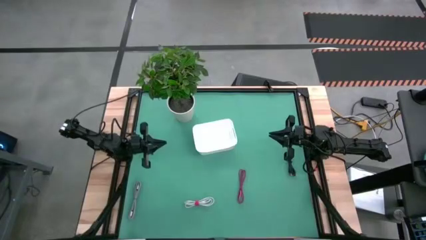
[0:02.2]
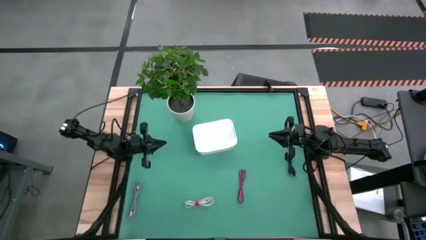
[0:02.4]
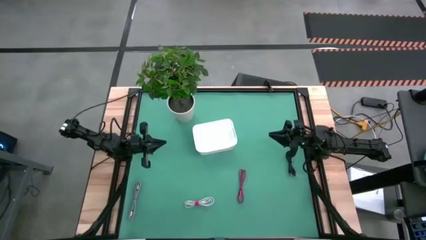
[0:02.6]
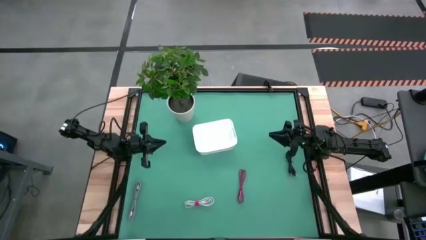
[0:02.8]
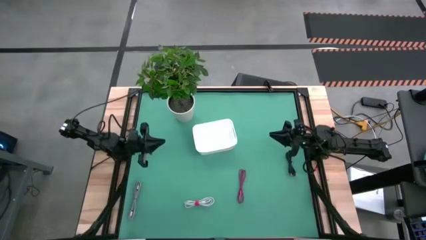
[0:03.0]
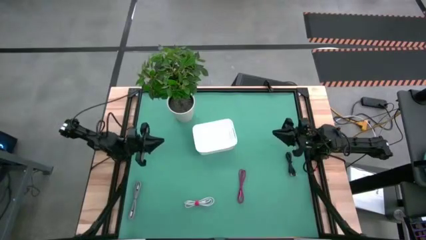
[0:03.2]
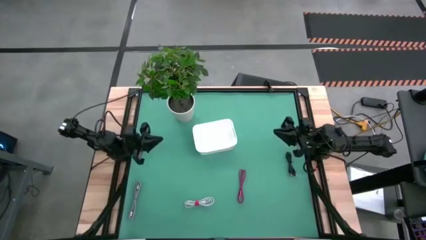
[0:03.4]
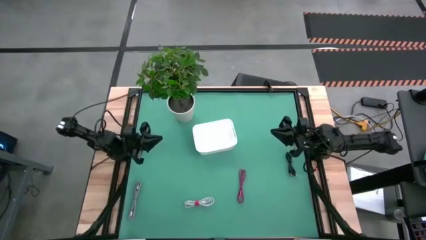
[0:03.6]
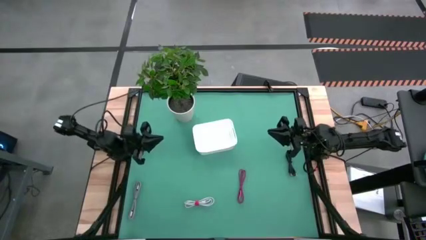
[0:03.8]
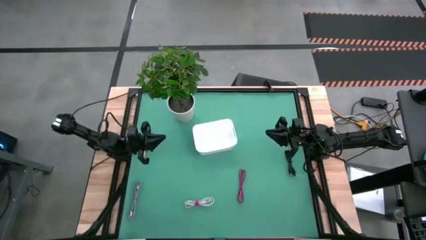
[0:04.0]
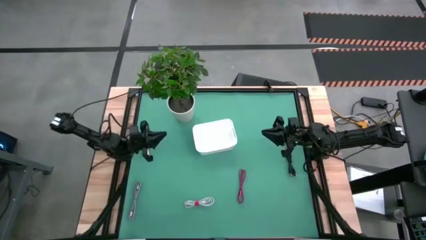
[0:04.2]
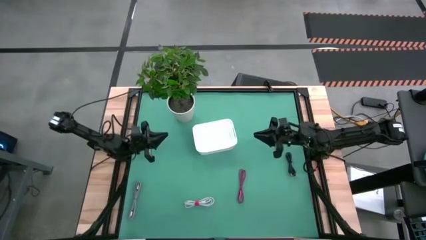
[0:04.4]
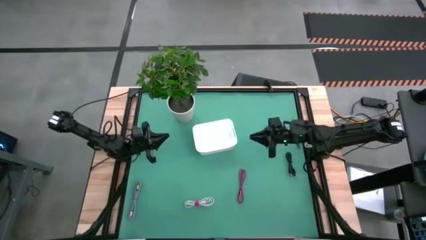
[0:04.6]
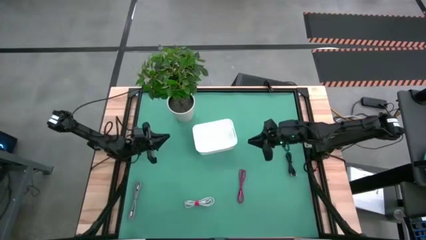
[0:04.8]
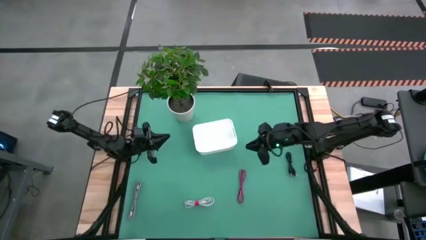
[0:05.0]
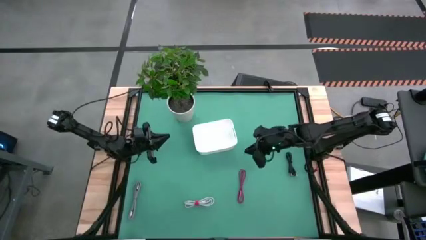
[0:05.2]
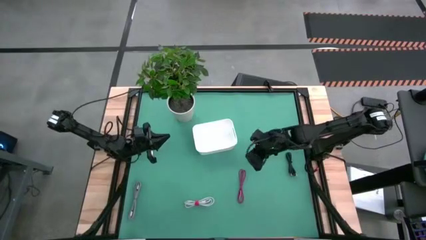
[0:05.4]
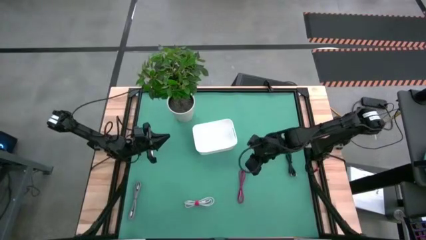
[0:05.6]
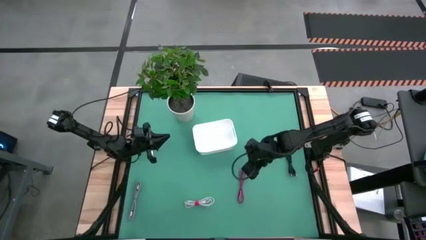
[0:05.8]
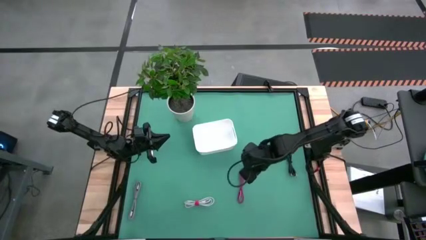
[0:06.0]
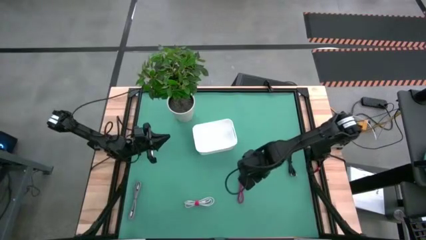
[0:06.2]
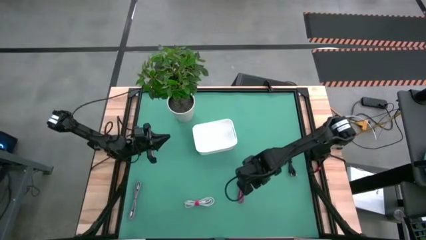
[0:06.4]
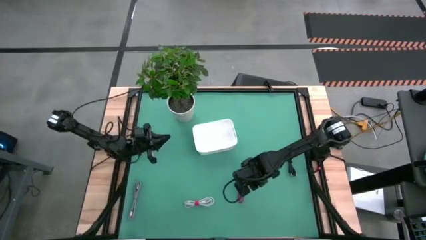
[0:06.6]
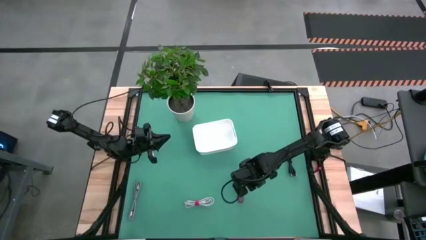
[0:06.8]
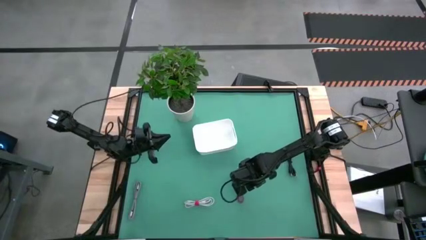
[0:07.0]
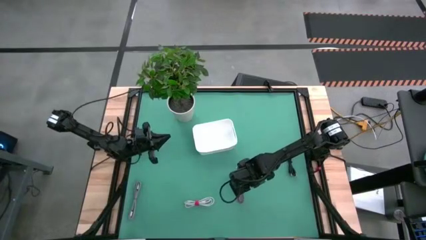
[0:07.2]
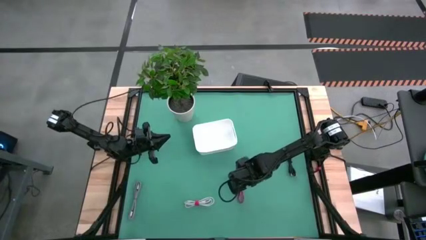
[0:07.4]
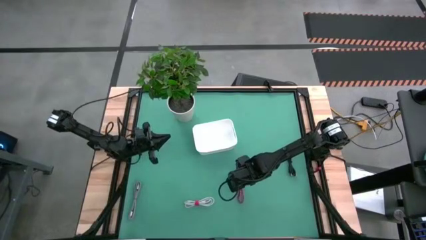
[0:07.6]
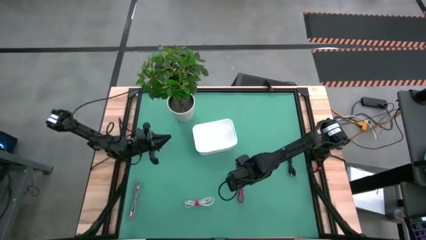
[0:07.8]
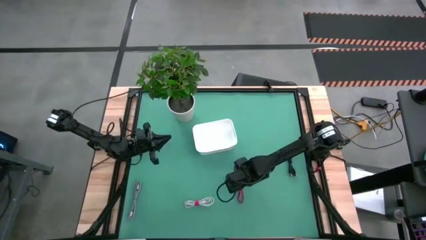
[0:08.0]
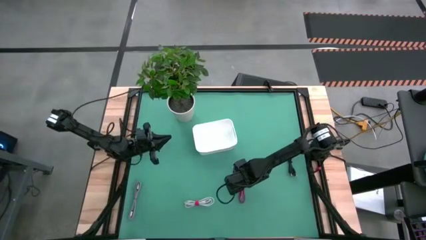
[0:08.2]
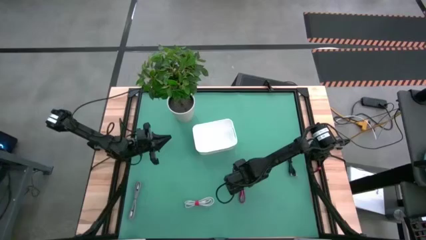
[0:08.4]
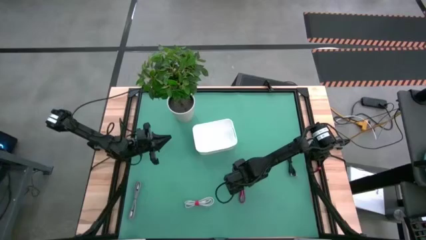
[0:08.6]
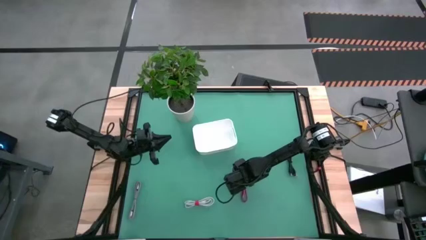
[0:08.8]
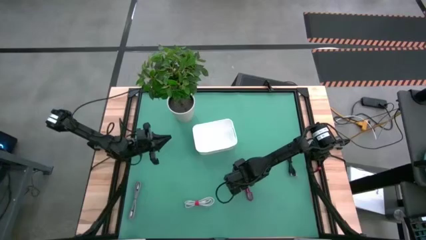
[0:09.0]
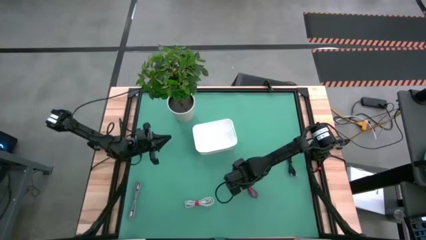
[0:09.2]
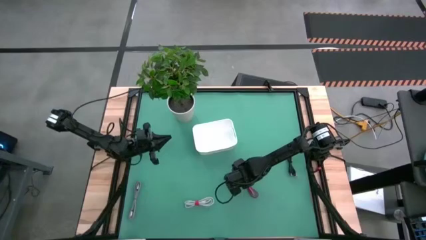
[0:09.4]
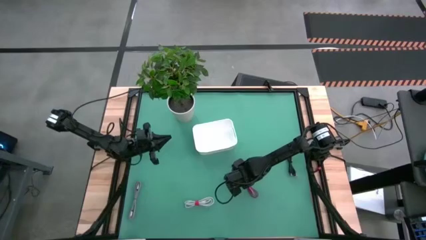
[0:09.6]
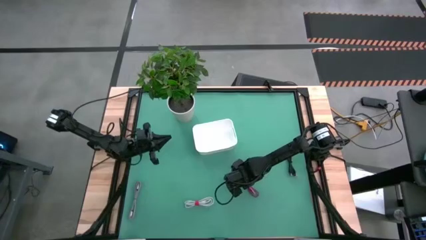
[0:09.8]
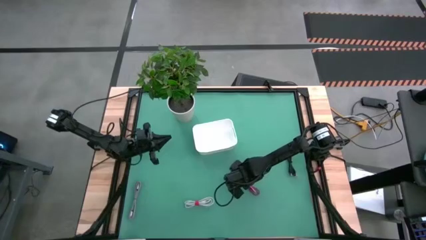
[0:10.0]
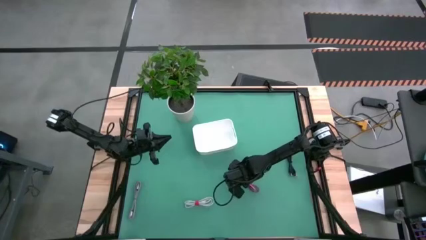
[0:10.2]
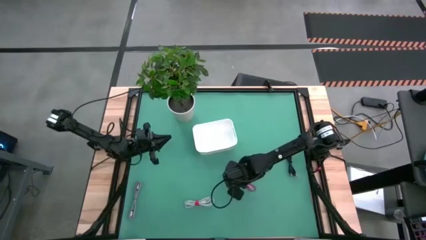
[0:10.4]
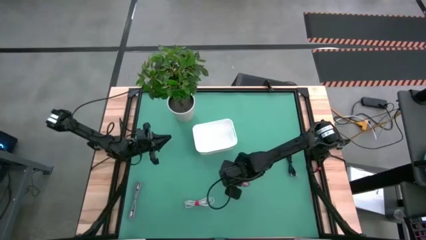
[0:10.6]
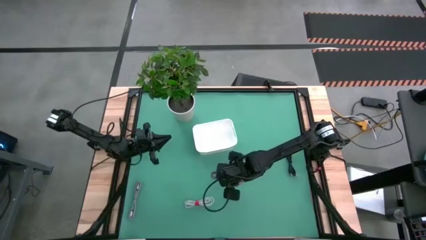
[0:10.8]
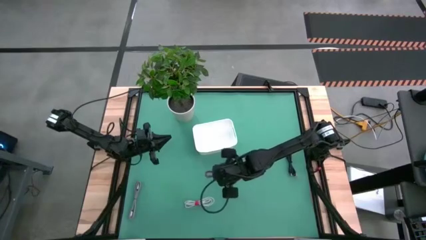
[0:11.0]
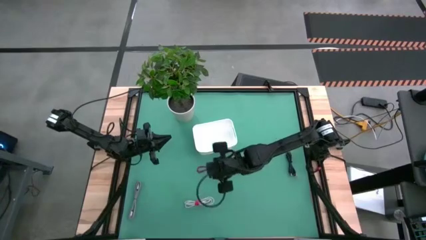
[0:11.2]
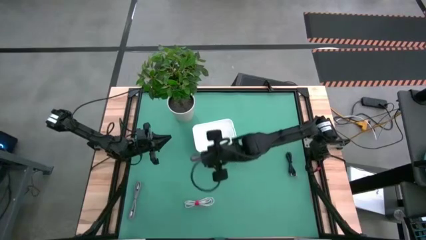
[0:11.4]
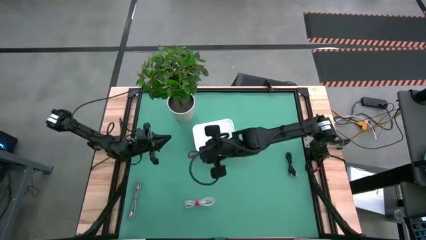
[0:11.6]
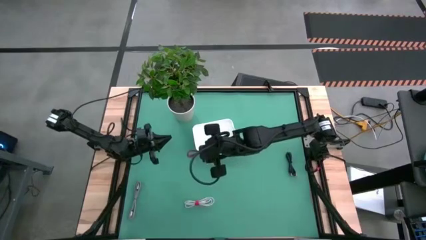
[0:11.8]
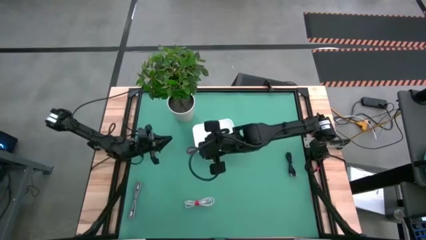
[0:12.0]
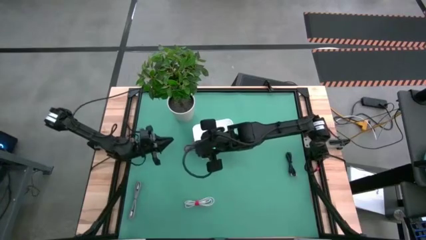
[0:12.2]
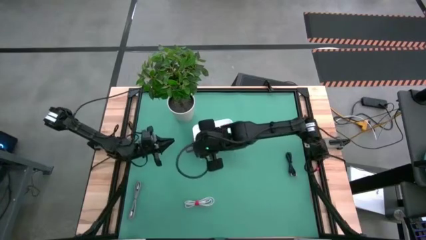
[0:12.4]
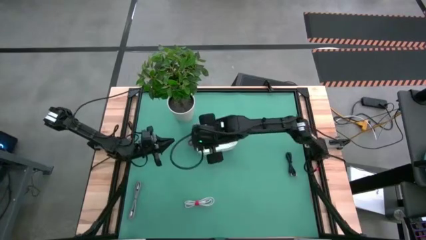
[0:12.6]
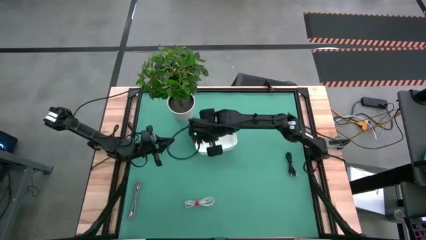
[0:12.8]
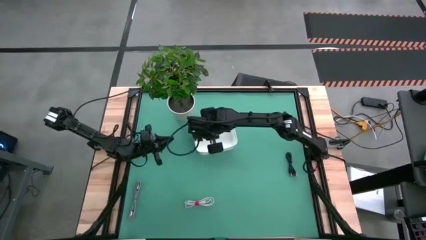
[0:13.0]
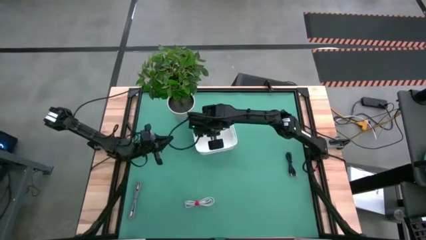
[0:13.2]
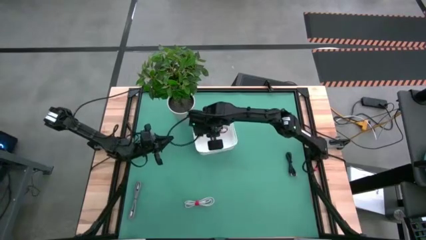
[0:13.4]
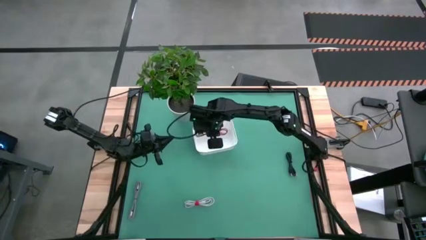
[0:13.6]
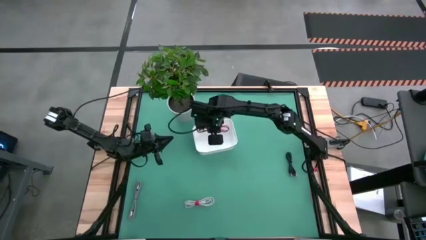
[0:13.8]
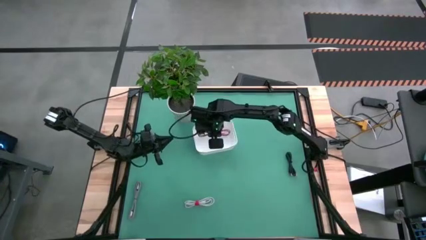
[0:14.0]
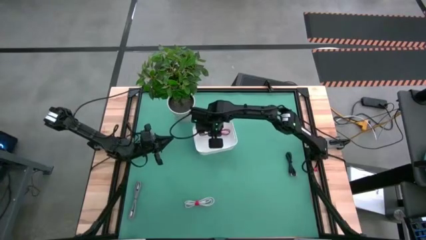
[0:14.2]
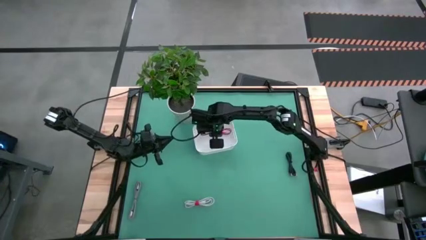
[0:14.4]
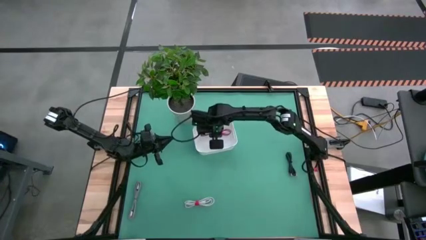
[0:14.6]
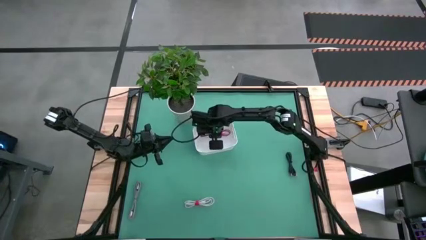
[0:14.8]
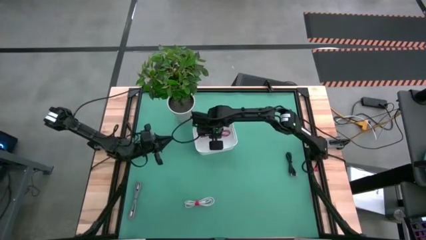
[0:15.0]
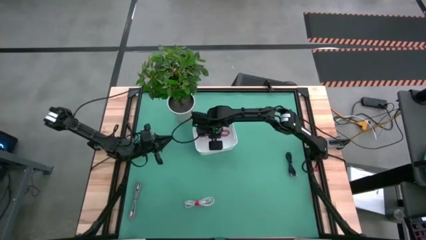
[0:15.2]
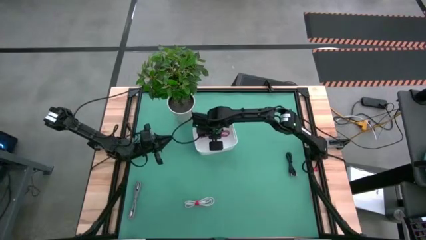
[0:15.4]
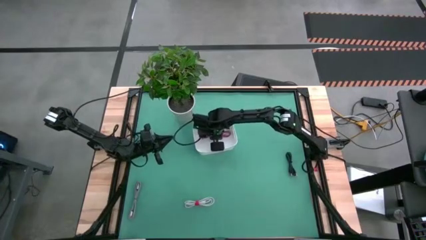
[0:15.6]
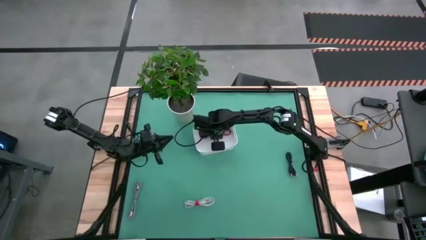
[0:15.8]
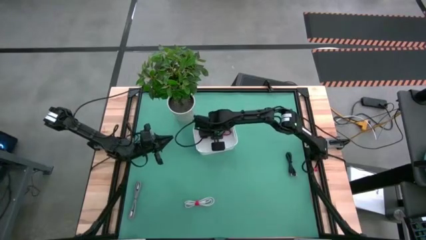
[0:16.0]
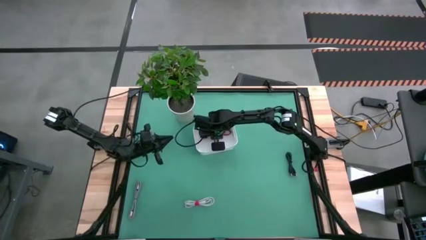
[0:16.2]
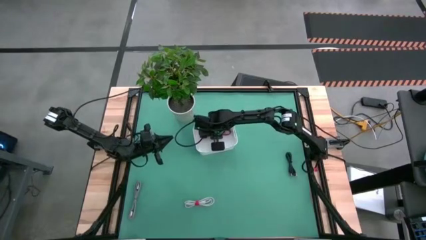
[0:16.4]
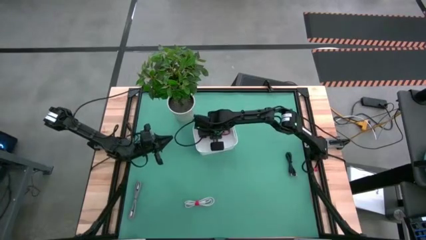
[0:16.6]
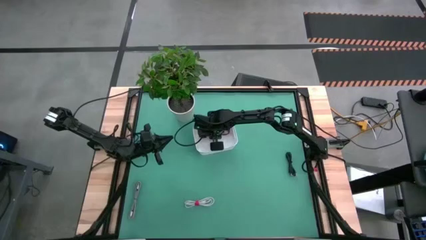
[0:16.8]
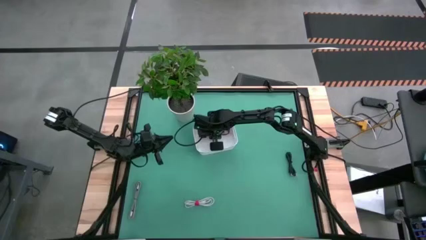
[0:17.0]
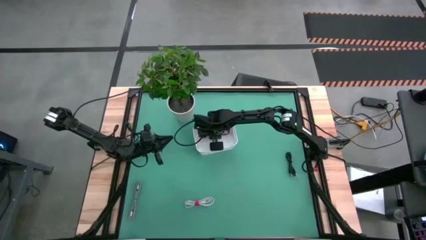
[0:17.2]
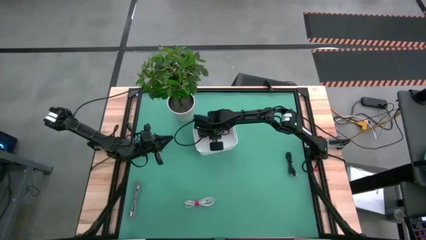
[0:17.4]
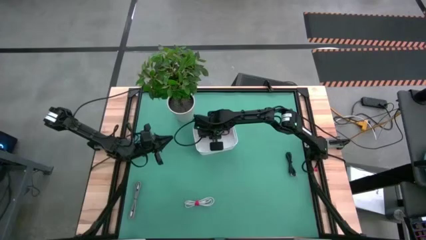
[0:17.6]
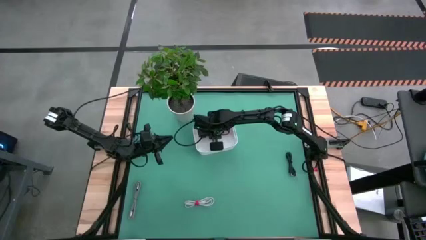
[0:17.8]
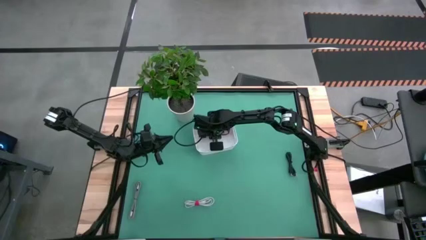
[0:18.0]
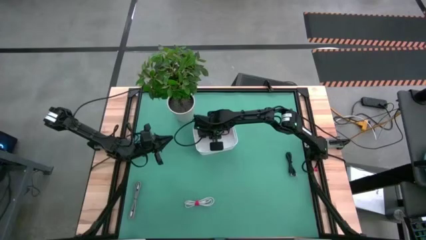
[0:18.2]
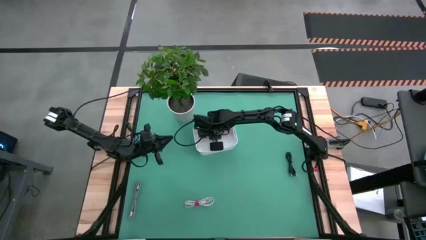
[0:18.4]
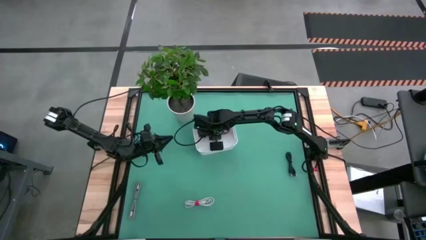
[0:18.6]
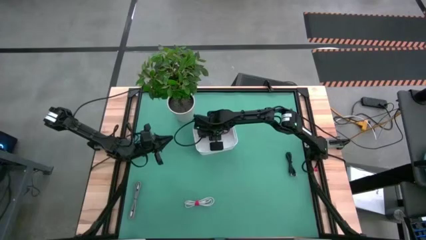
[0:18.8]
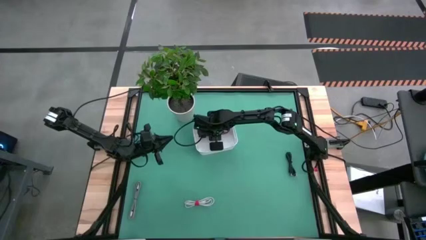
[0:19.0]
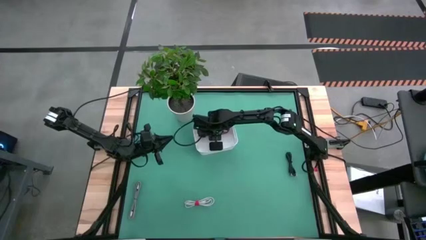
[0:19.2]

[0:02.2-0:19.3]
Task: Pick and place USB-C Cables
Put the red charger cable into the white bin
